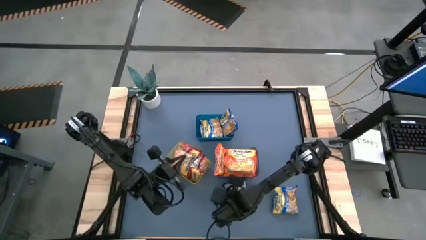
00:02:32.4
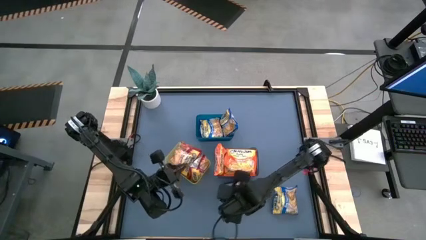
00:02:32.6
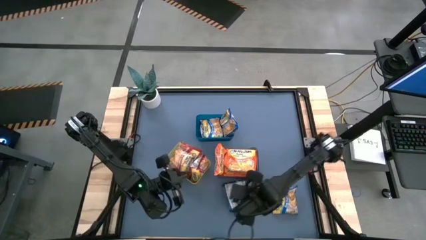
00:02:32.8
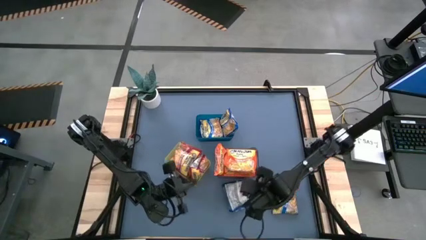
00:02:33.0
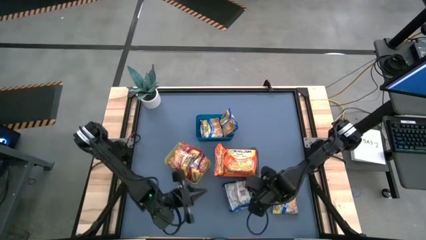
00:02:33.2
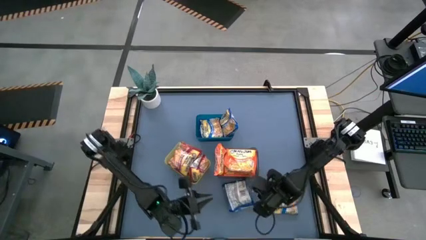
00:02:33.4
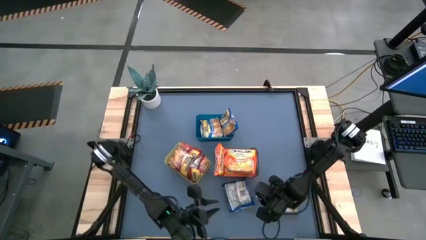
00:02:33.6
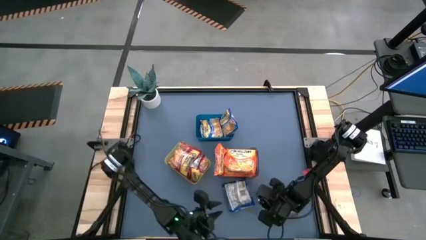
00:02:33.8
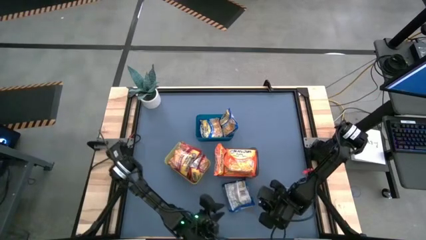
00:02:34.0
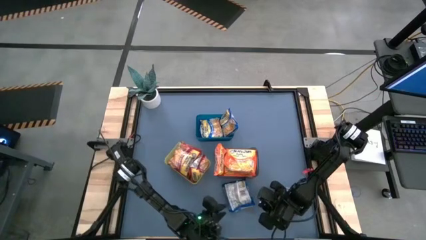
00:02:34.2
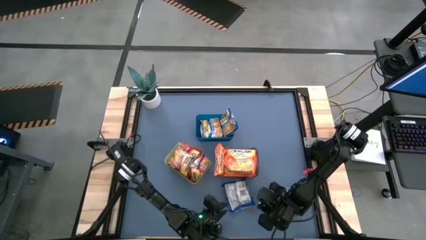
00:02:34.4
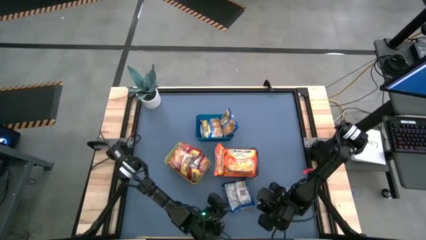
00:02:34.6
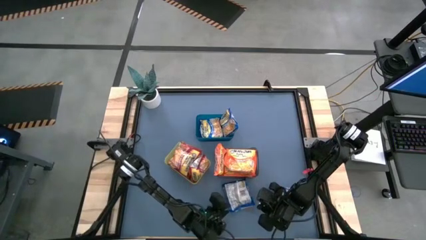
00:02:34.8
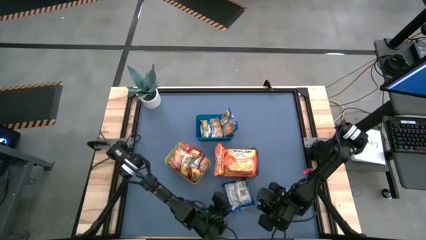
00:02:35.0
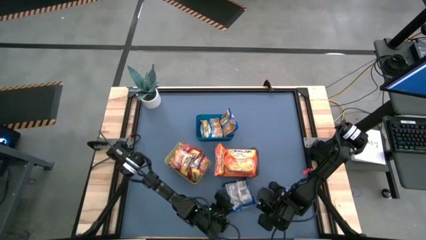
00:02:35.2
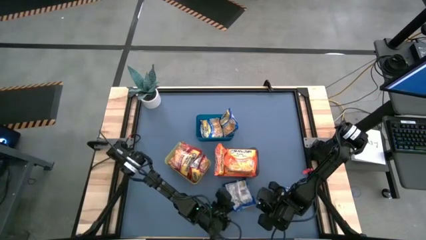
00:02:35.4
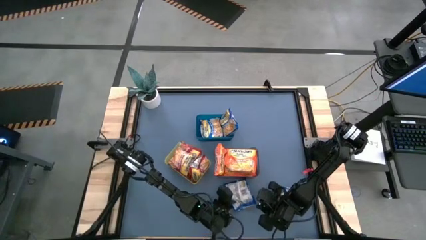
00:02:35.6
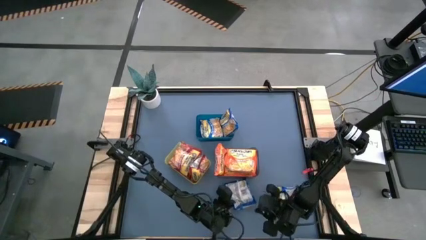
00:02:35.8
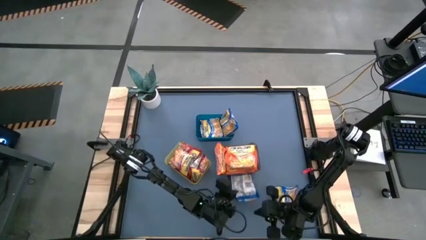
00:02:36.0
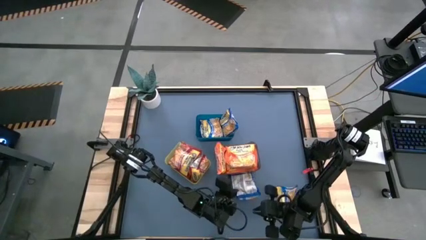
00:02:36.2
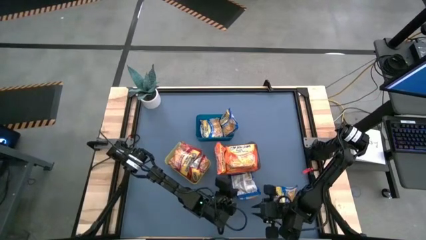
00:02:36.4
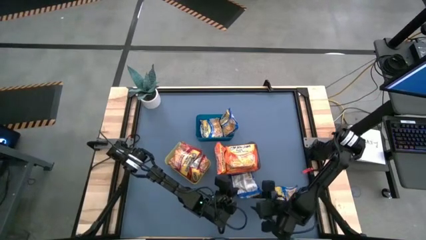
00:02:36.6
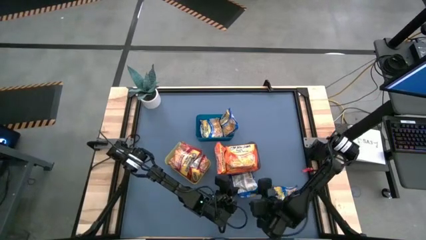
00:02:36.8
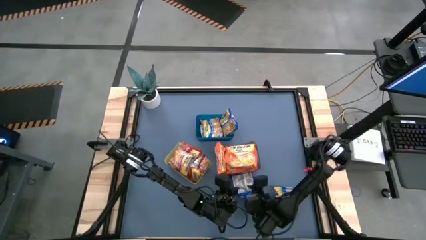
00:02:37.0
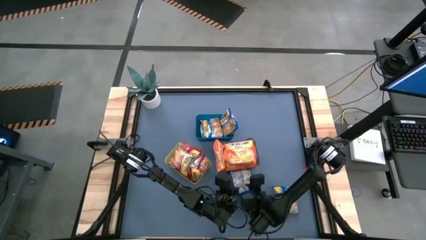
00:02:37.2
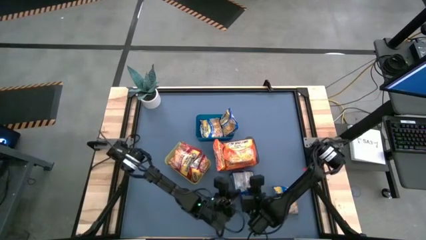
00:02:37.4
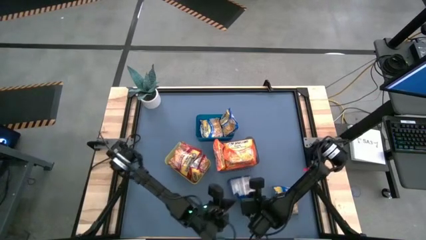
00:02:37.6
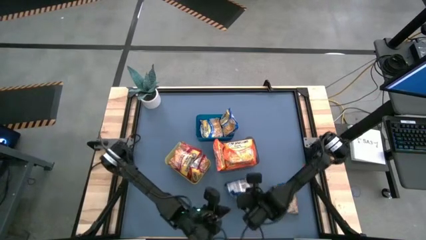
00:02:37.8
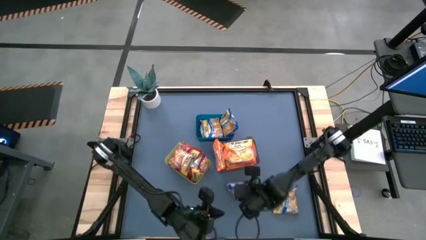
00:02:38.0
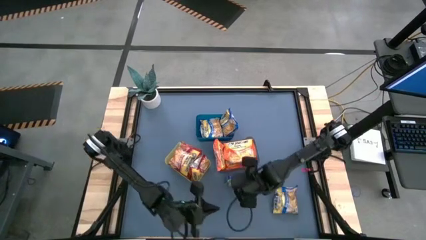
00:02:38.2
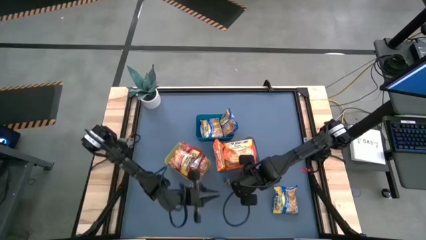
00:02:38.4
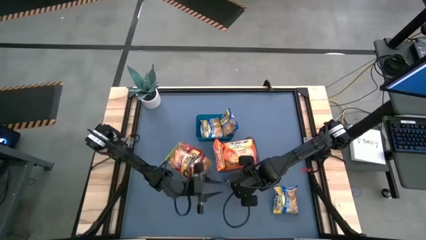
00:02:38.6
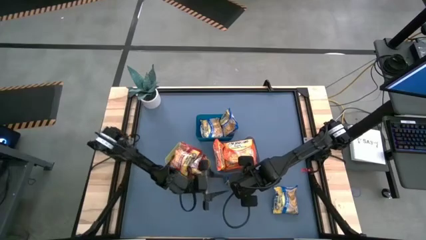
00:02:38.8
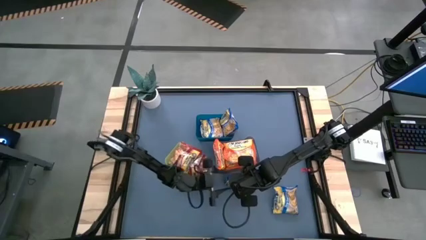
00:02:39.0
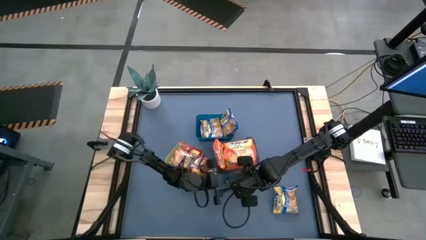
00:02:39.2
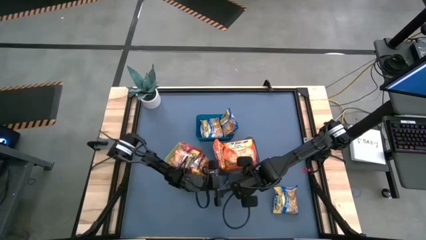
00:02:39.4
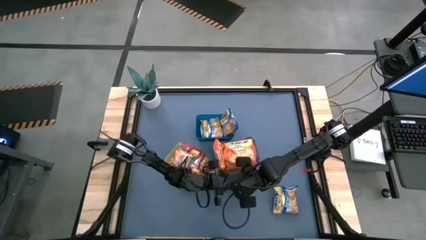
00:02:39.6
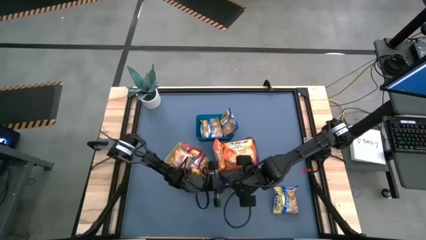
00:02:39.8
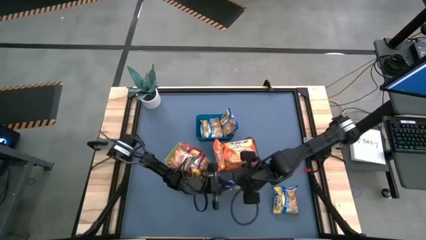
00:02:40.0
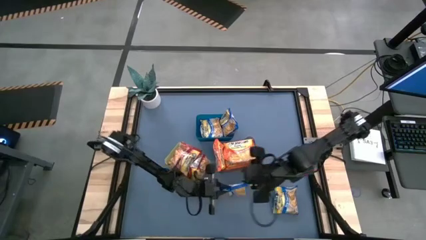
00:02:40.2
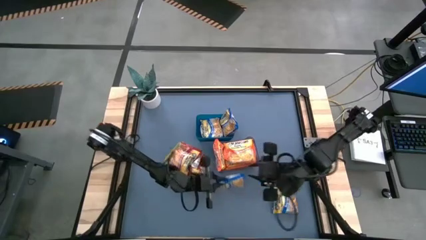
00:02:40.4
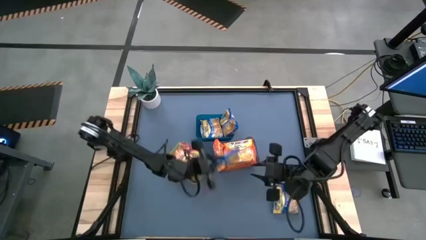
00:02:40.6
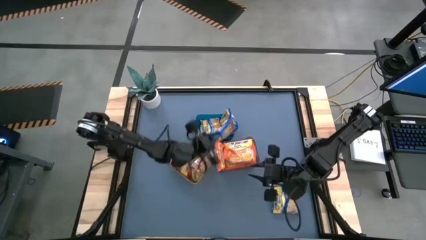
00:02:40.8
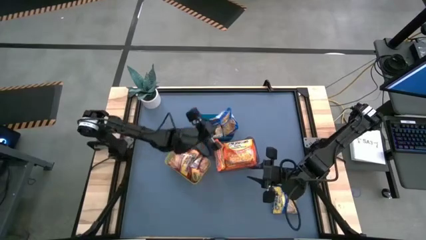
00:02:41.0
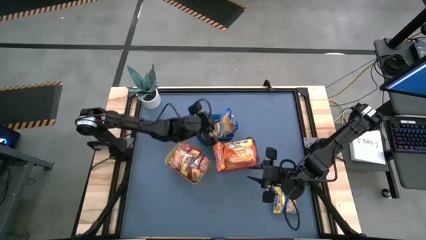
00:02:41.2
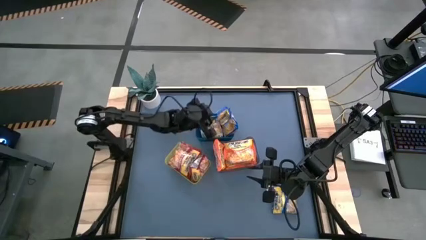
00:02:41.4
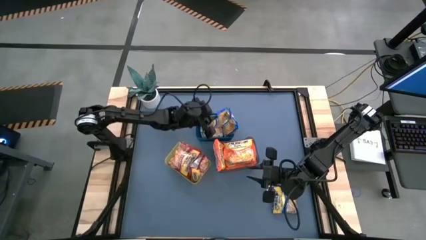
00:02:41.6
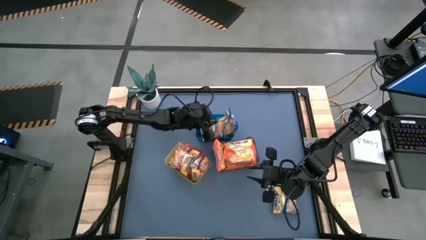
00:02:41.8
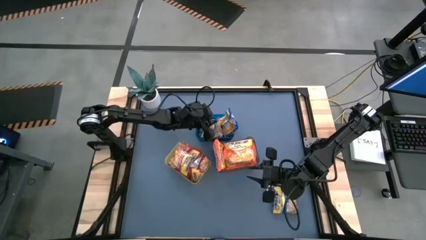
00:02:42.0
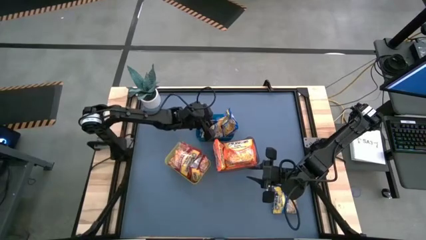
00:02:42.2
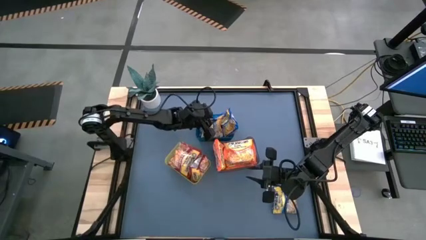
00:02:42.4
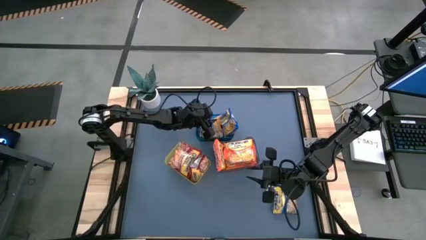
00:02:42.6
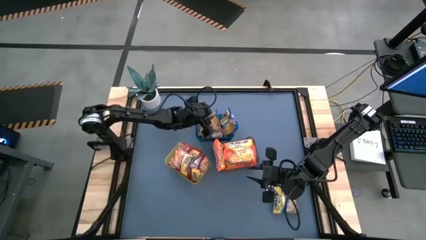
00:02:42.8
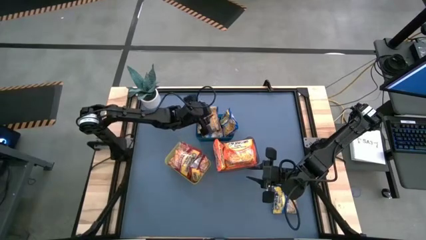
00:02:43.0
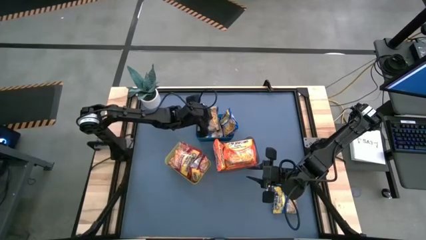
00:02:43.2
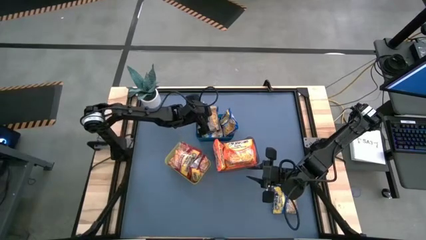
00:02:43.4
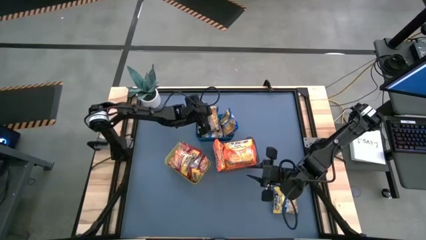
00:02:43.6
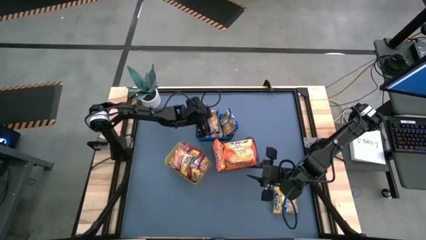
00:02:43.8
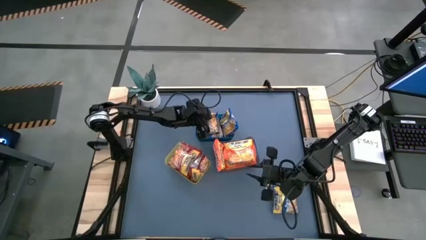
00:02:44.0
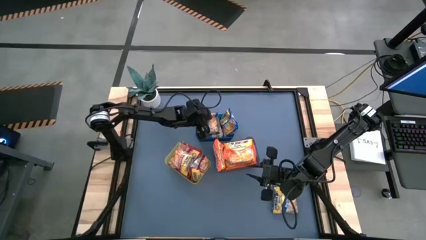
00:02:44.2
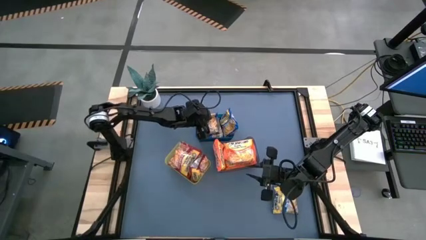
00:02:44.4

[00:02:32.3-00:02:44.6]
Task: Sort Maruchan noodles
Stack the blue noodle pack on top of the blue noodle pack in the blue bin

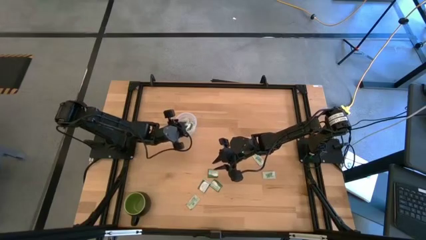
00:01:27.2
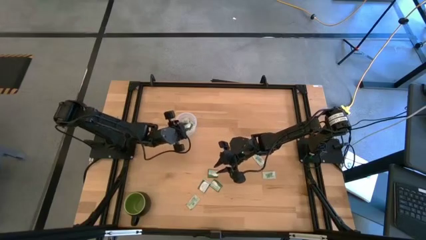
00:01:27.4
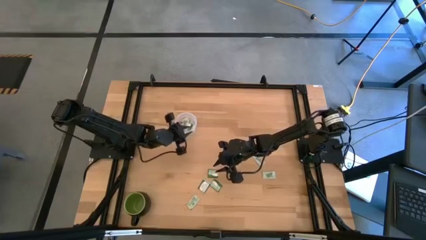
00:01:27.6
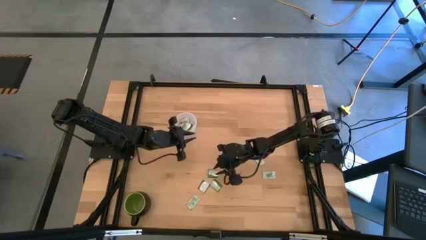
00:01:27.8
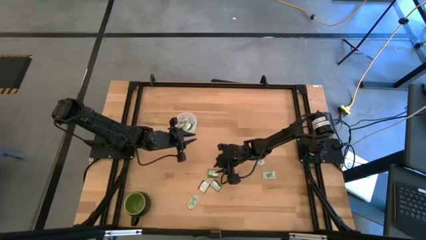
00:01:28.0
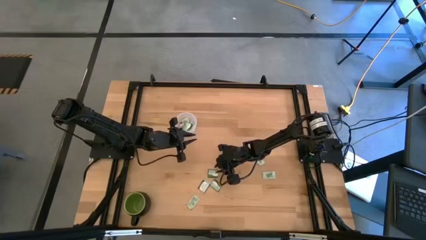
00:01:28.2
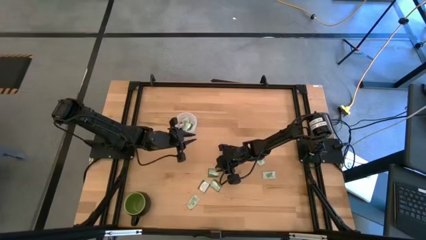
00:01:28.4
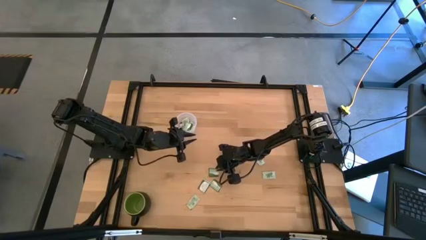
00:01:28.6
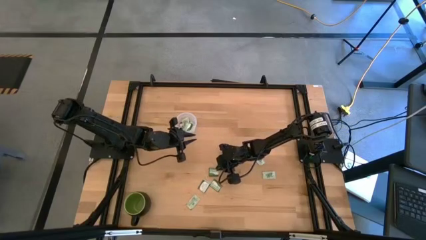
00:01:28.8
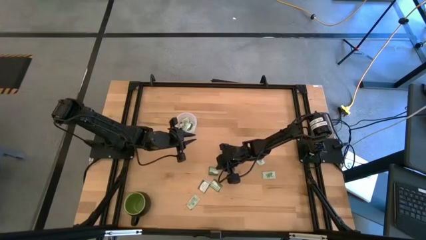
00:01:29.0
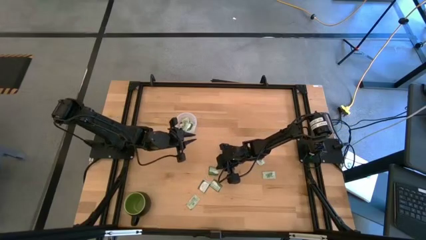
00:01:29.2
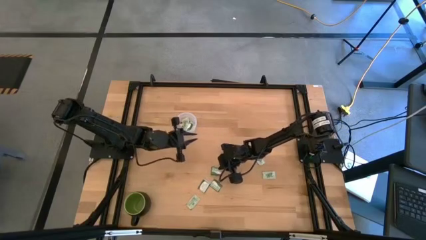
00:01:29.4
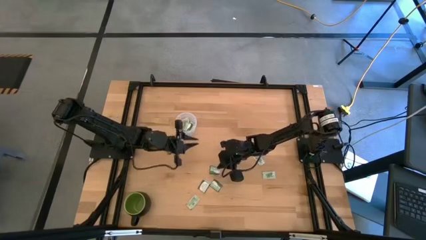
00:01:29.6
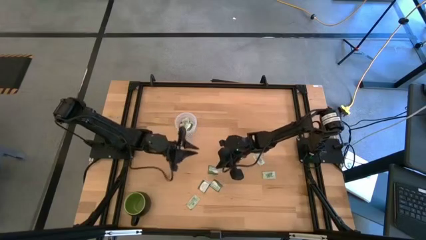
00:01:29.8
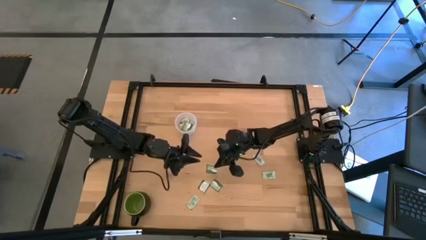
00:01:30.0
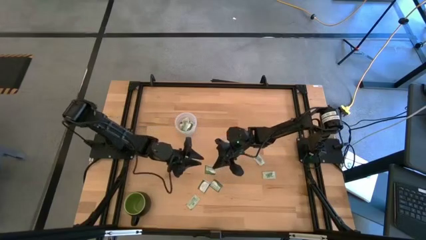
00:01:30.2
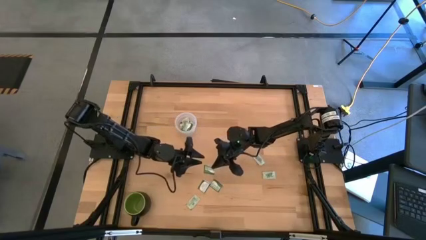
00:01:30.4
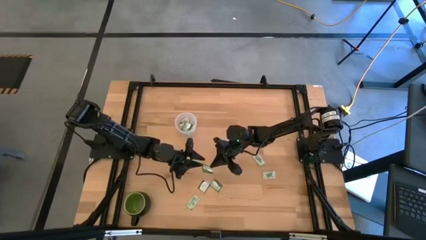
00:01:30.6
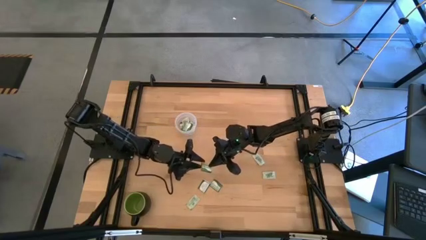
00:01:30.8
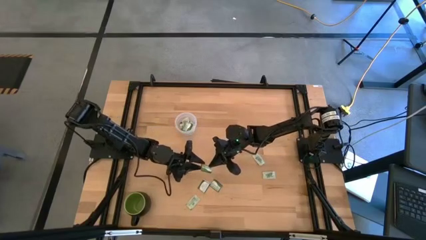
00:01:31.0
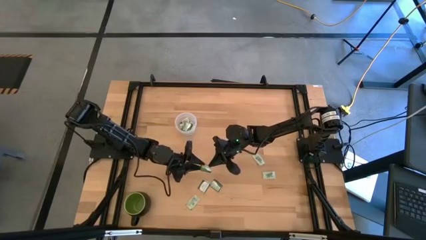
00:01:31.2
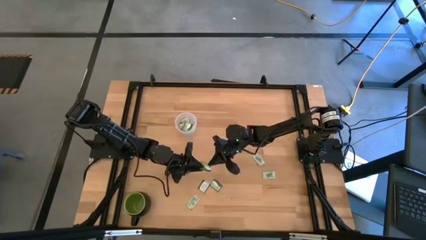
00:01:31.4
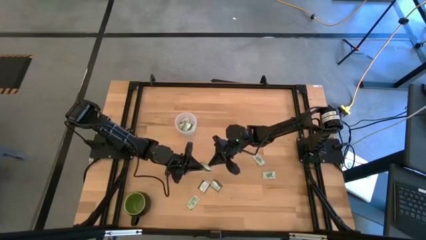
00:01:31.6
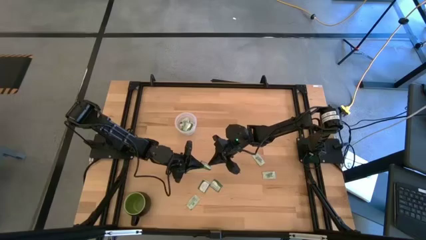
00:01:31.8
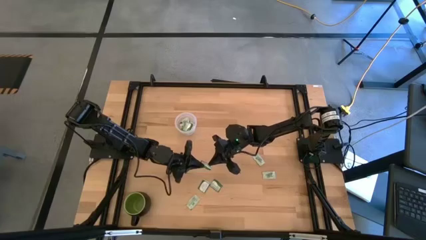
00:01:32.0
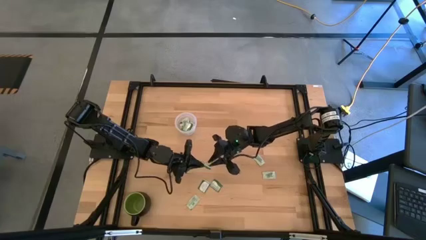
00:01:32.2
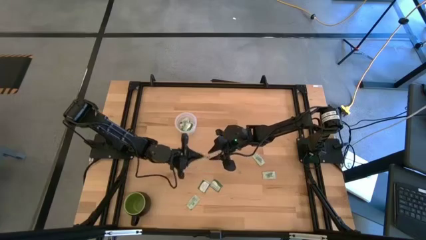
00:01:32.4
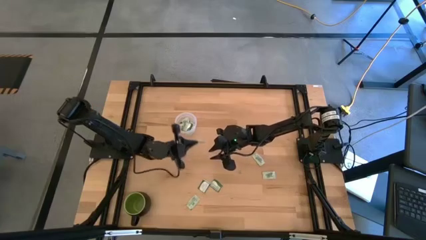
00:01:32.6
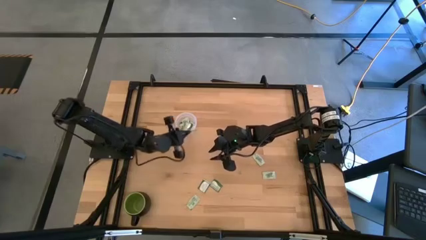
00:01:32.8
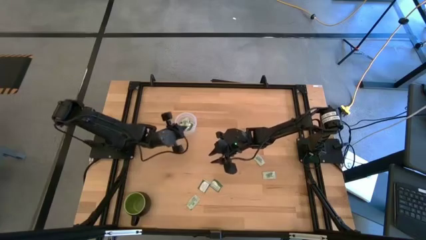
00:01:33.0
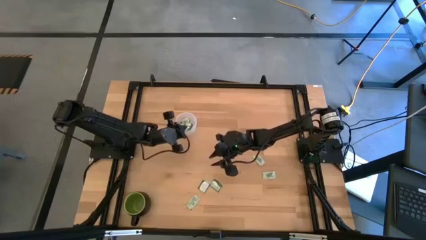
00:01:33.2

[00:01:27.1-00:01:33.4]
Task: Pick and place Stevia / Truvia into bins
Put the green stevia packet into the transparent container
